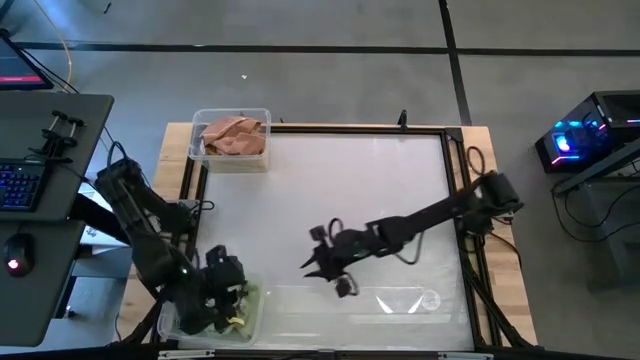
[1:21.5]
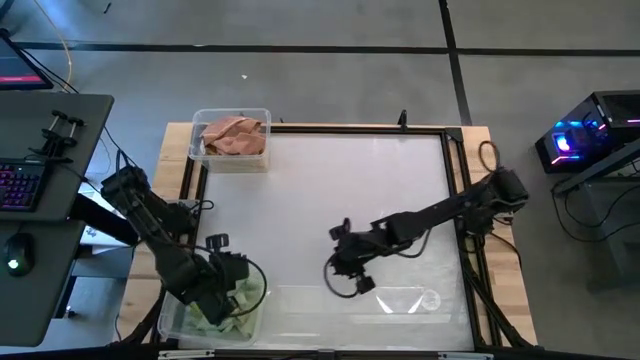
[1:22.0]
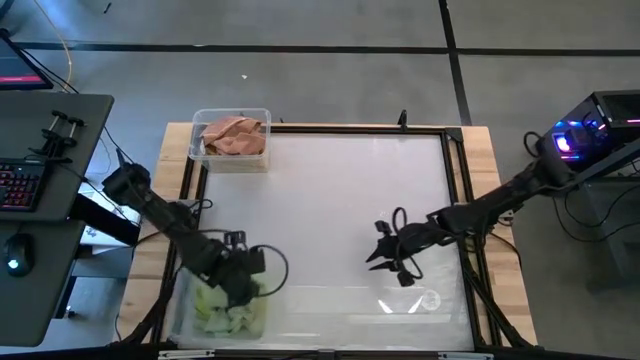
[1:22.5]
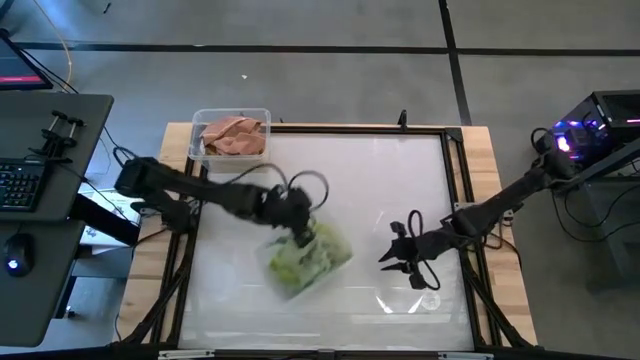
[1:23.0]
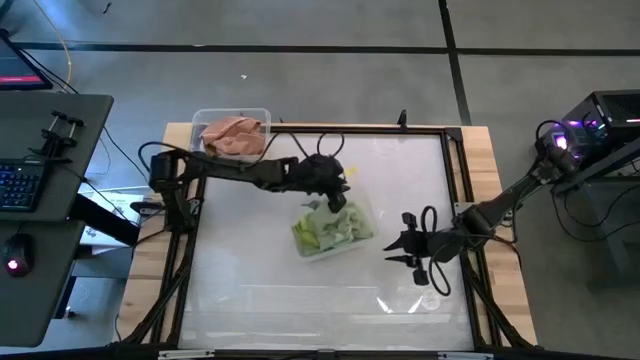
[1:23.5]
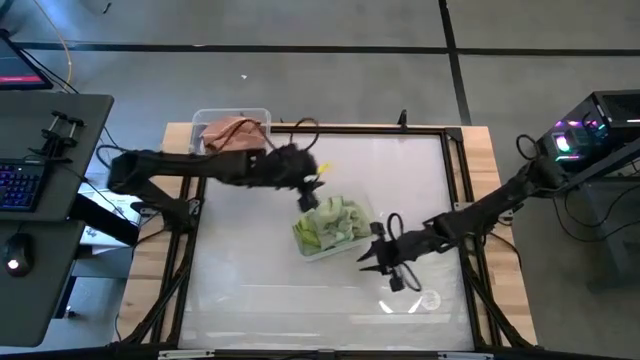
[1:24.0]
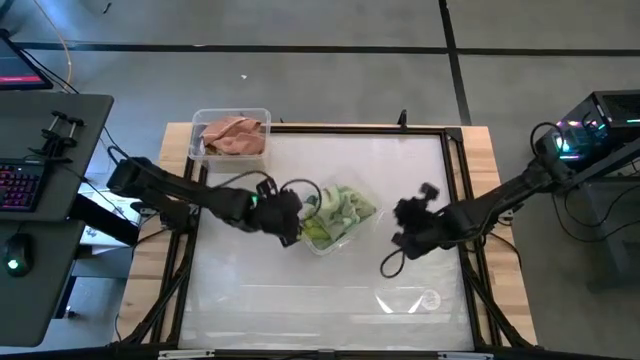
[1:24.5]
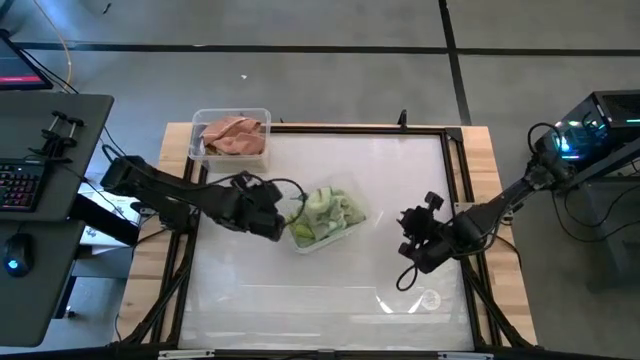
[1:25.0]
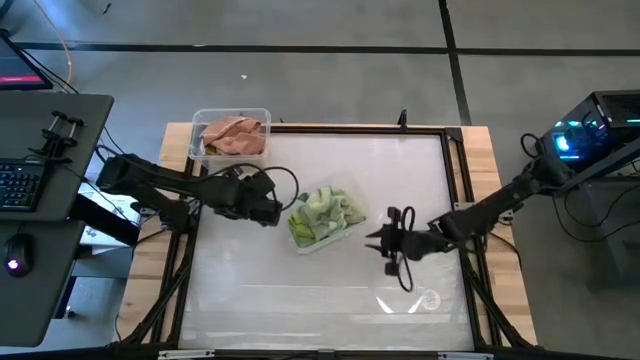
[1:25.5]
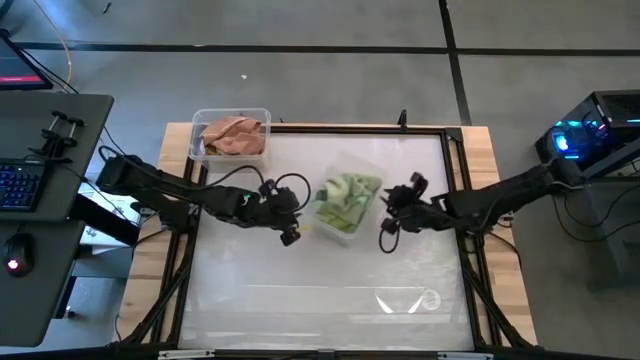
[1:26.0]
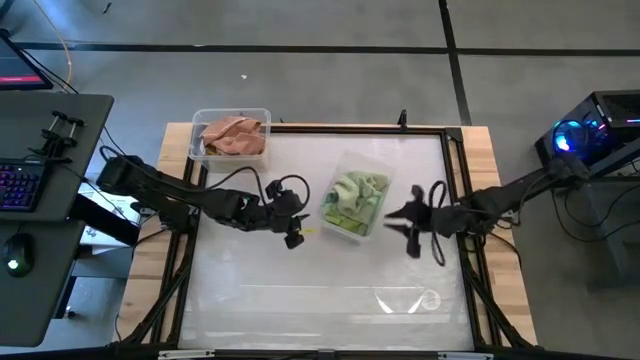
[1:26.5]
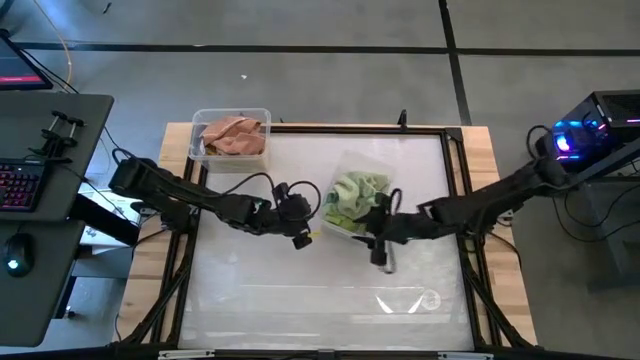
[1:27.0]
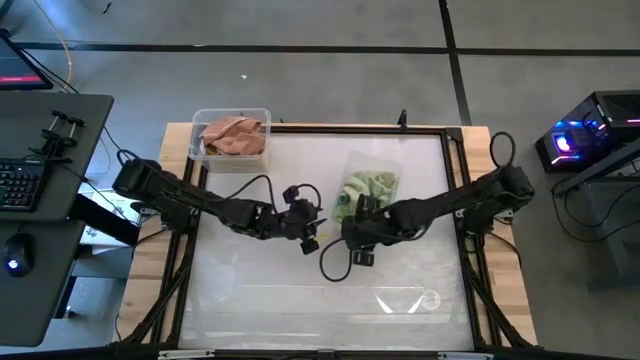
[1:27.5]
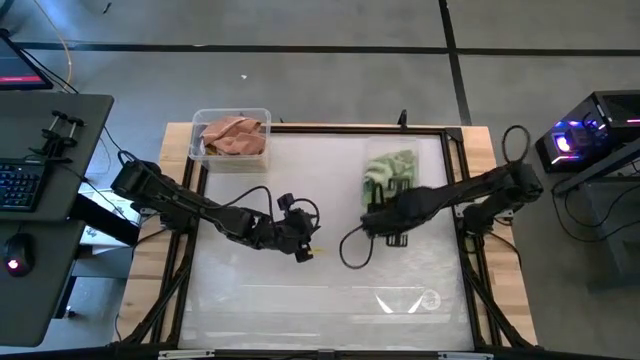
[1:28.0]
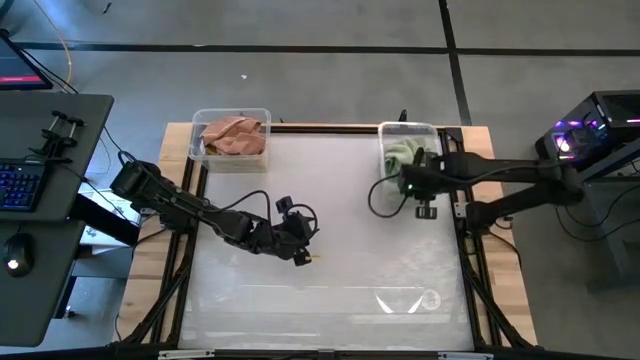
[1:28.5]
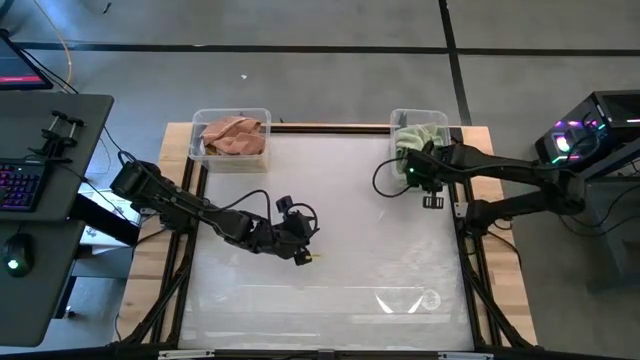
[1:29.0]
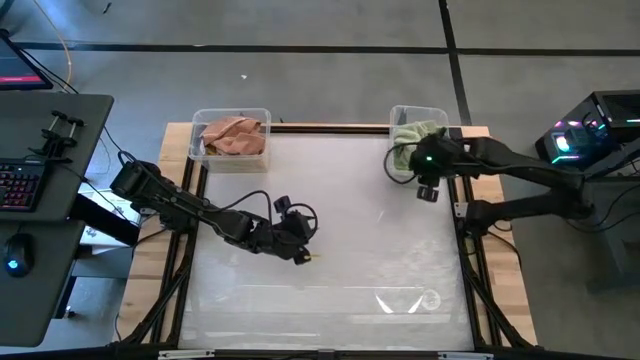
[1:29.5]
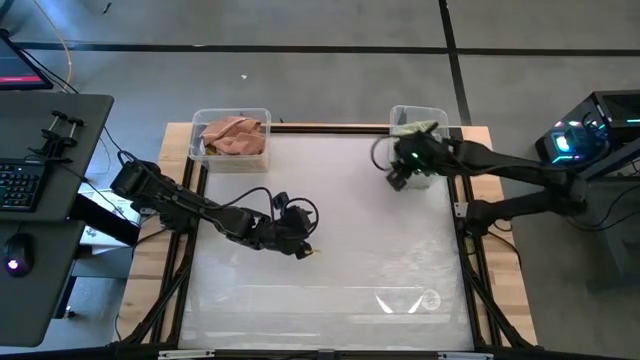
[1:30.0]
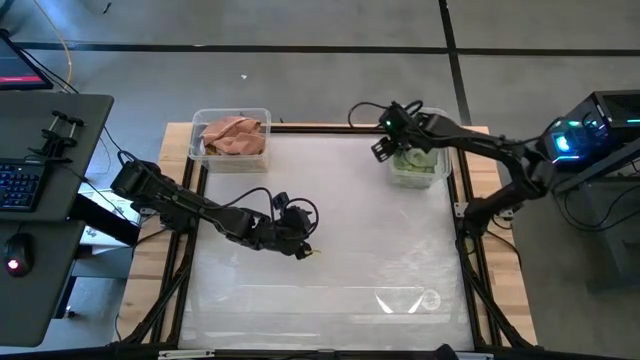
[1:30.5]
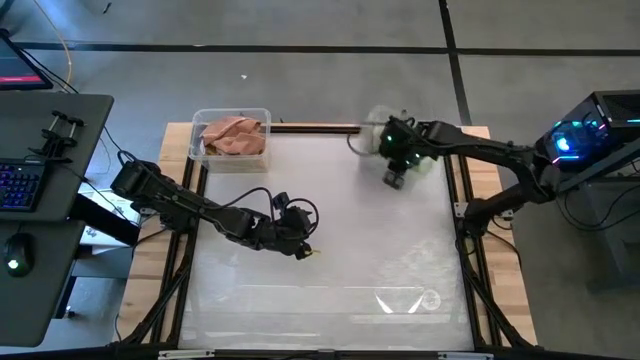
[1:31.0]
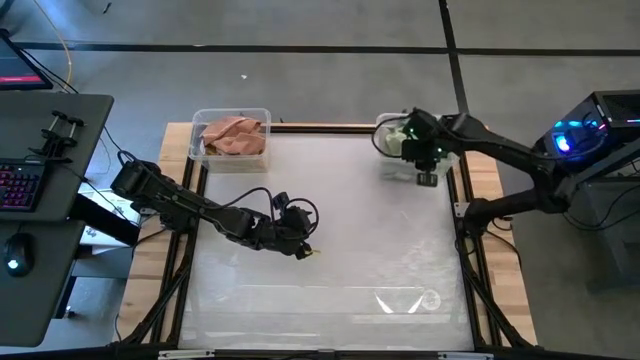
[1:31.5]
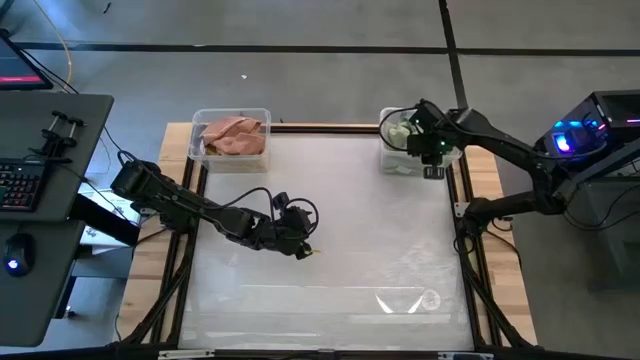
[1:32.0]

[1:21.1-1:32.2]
Task: Sort towels by color in basket
Move the bottom transparent bin to the top right of the table

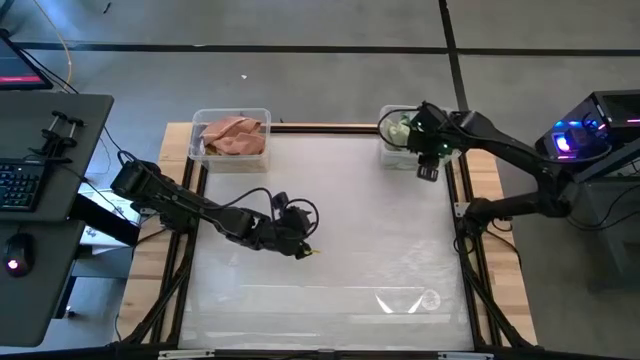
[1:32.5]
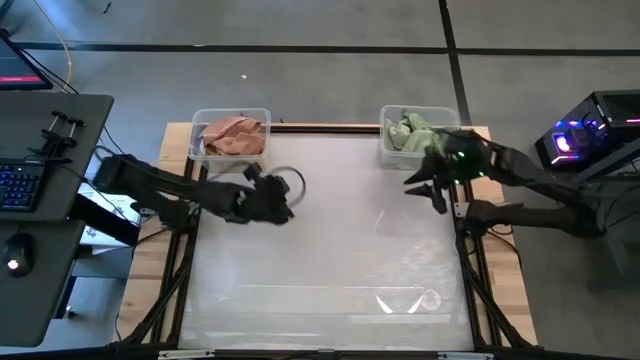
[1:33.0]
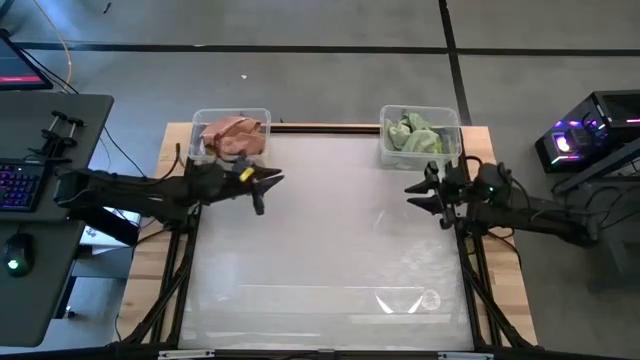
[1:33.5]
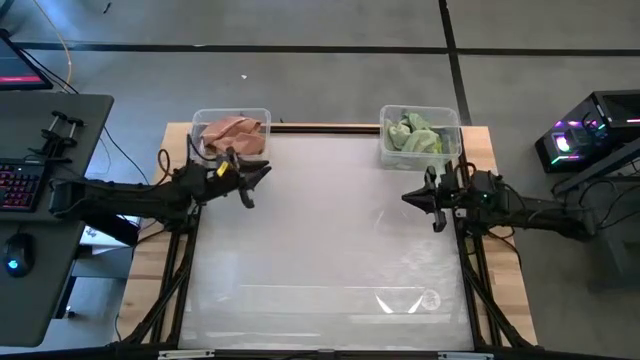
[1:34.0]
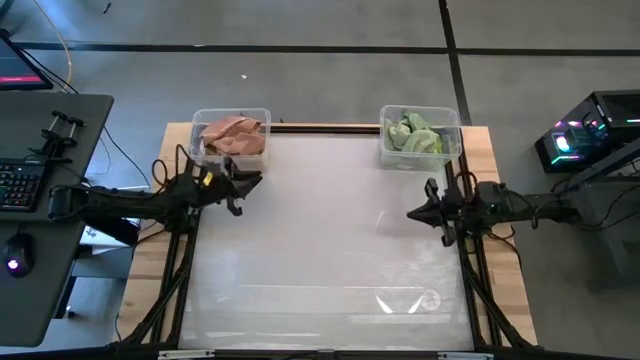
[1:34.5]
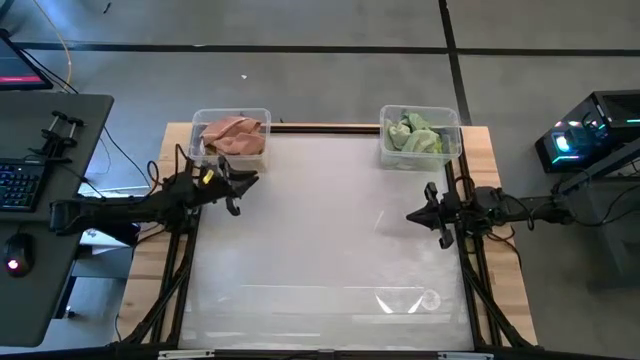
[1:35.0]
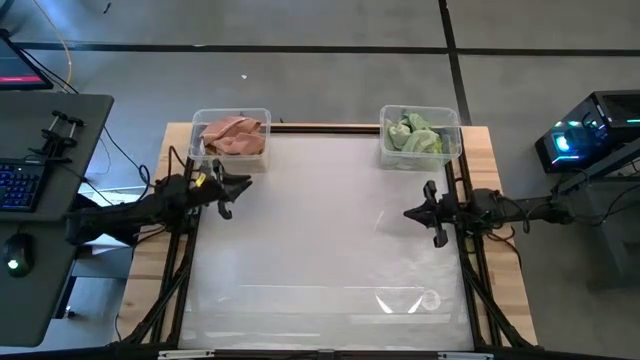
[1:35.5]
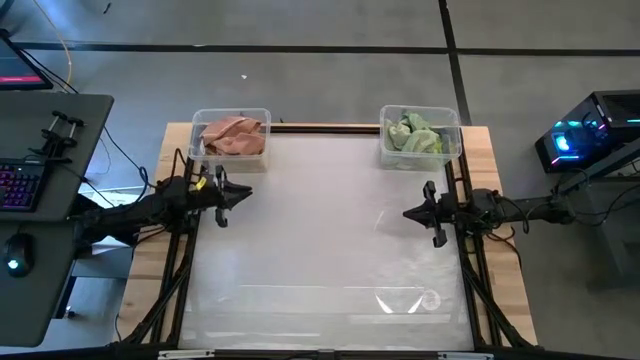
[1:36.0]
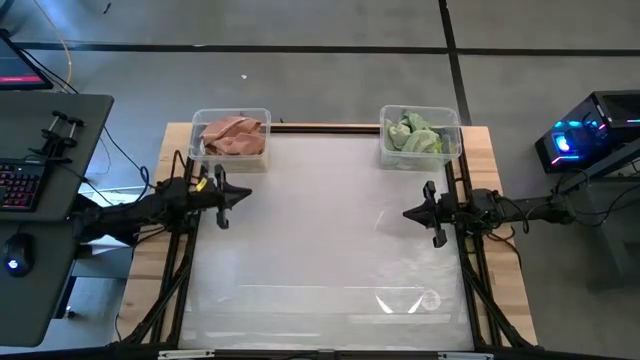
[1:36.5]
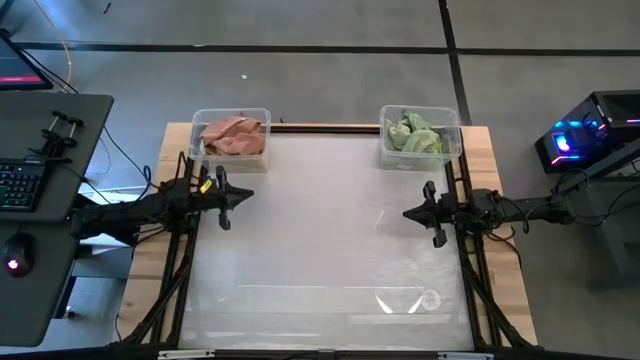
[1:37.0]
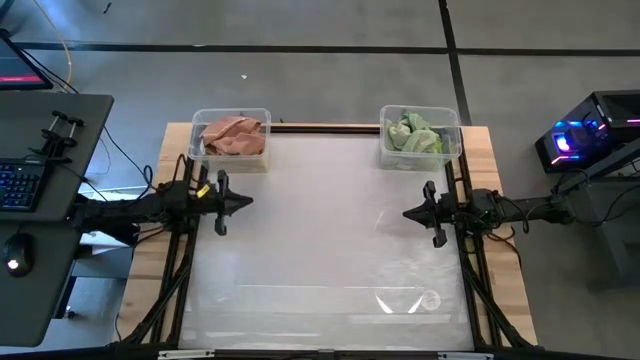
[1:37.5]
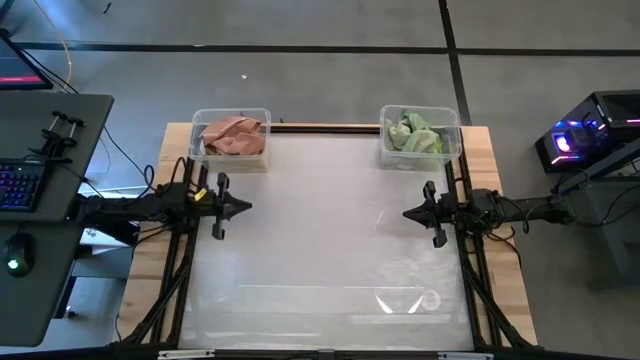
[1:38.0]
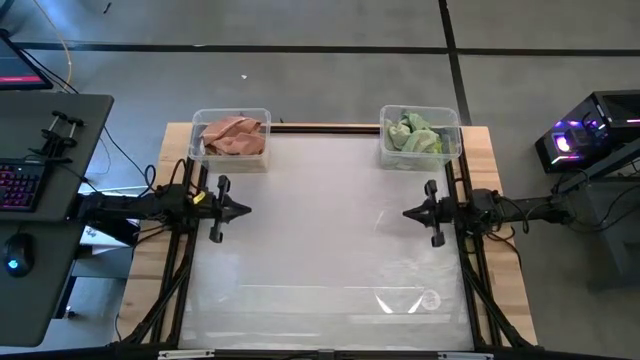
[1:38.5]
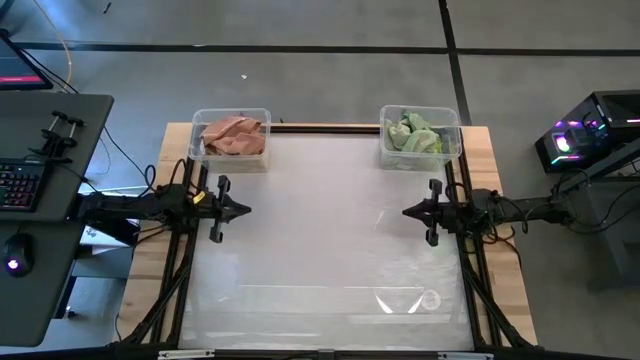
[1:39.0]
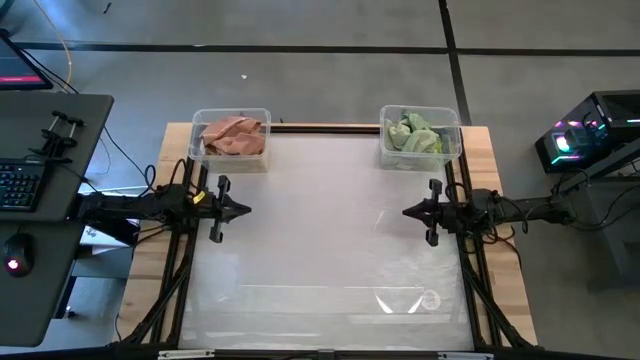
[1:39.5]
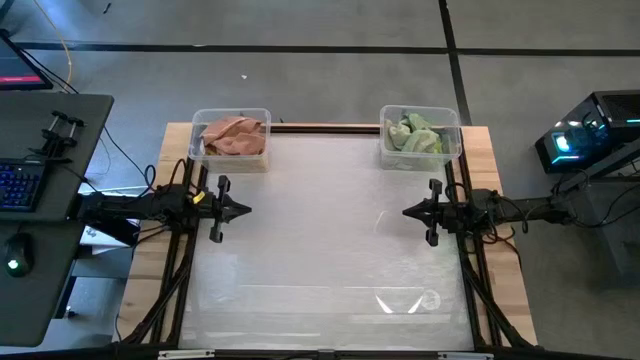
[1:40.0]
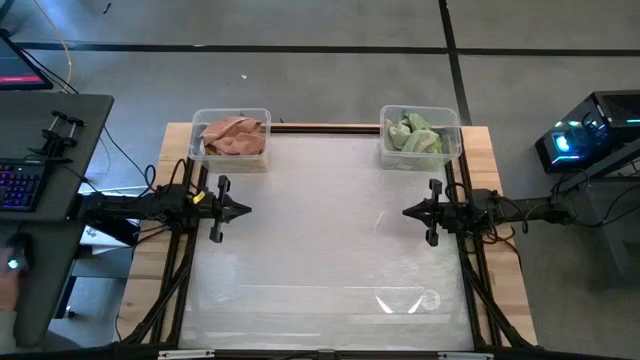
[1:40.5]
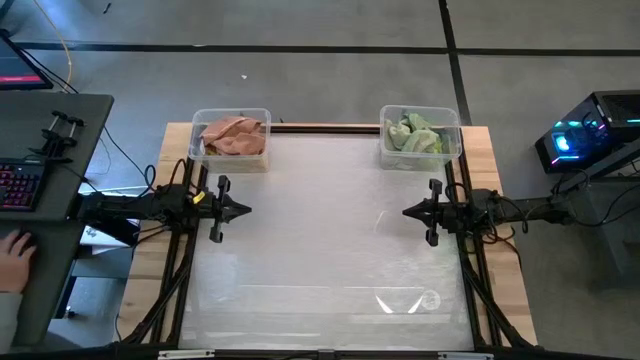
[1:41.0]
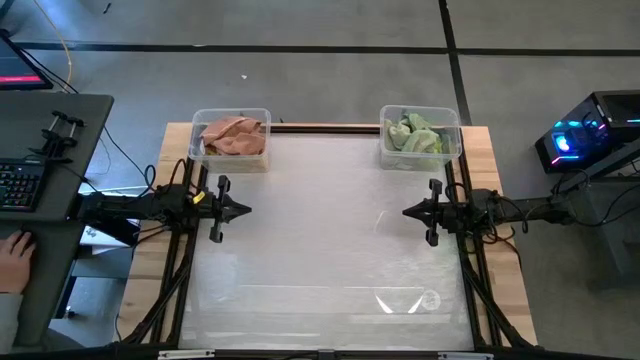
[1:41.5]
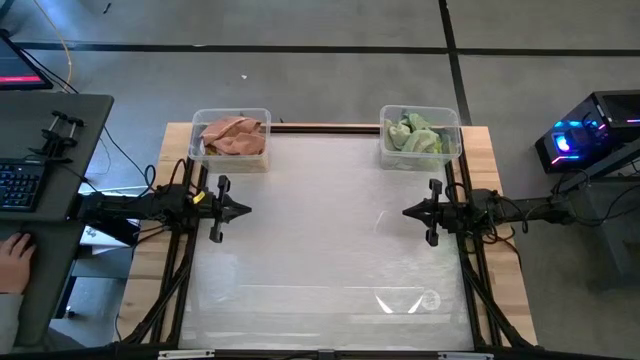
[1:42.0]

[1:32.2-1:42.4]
Return to Home Position
